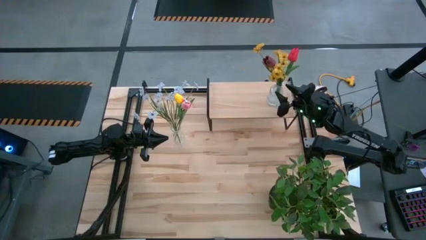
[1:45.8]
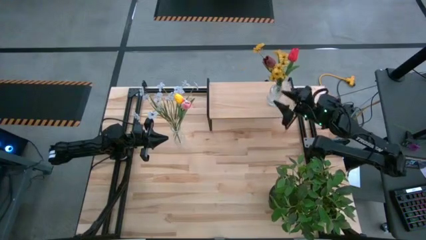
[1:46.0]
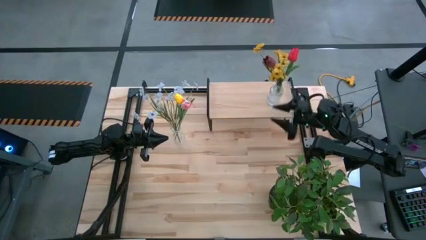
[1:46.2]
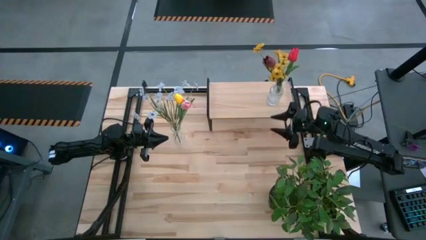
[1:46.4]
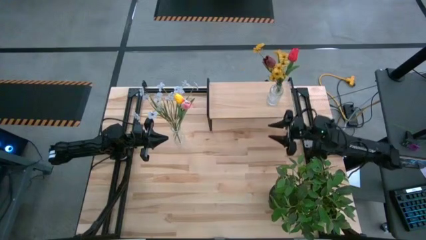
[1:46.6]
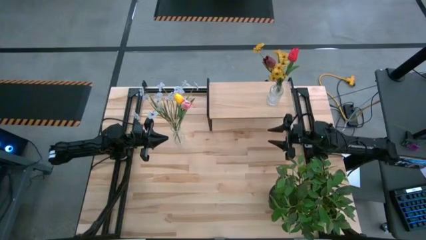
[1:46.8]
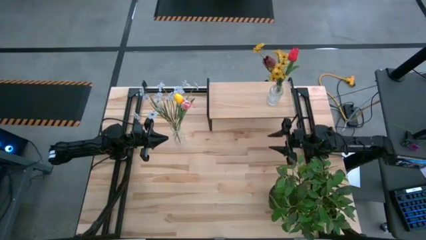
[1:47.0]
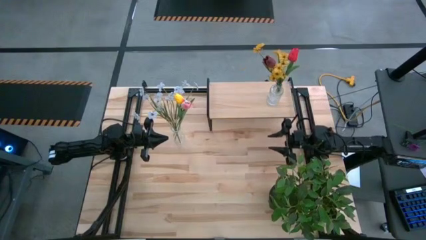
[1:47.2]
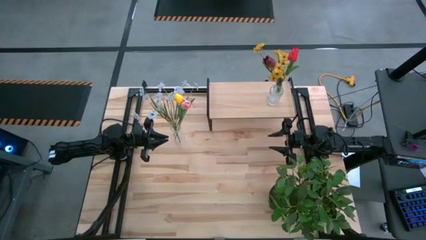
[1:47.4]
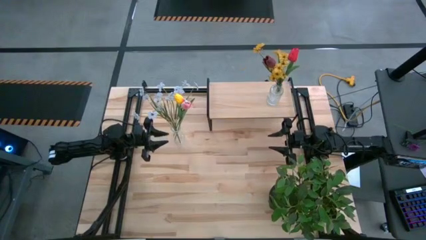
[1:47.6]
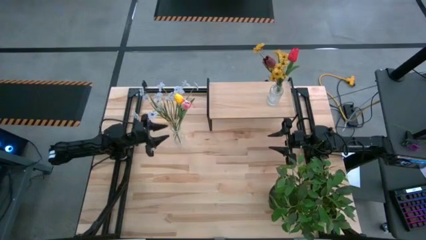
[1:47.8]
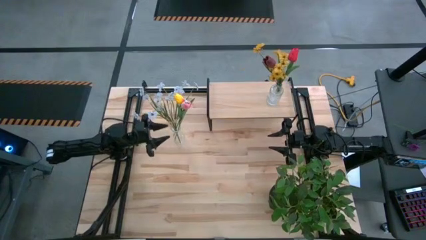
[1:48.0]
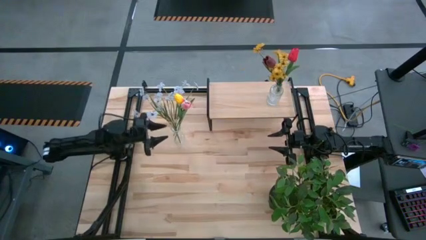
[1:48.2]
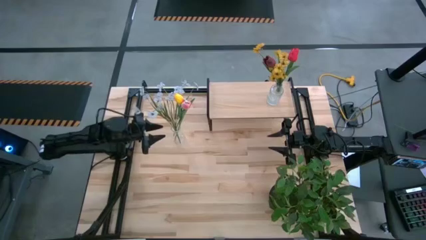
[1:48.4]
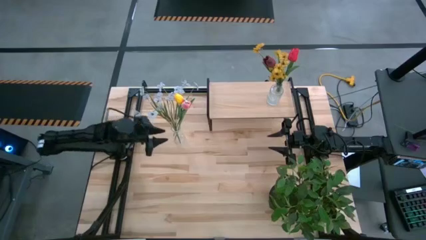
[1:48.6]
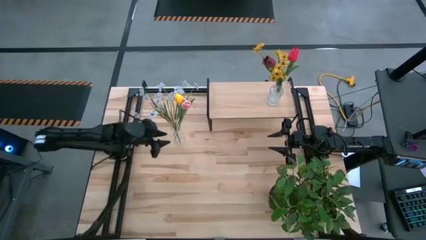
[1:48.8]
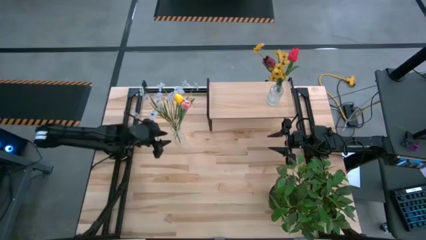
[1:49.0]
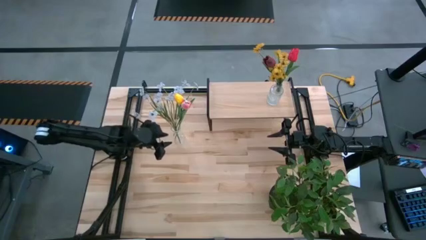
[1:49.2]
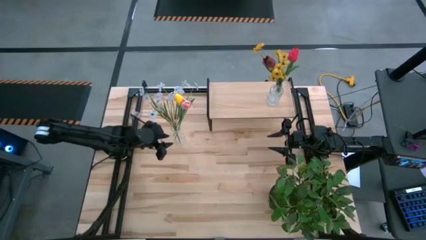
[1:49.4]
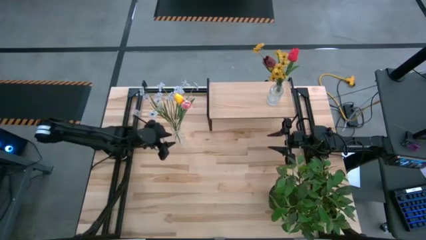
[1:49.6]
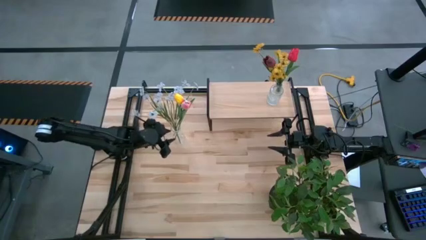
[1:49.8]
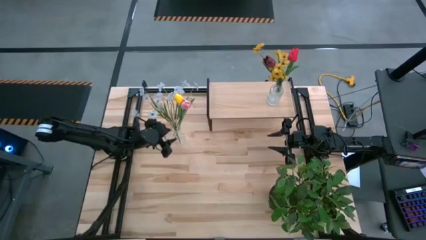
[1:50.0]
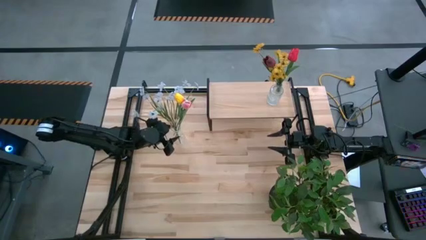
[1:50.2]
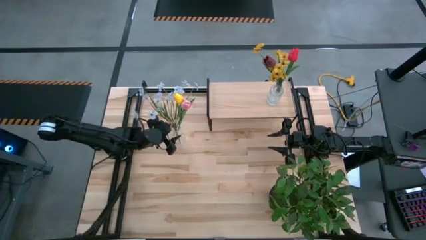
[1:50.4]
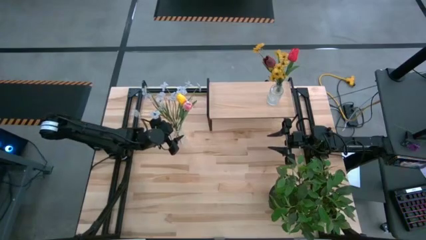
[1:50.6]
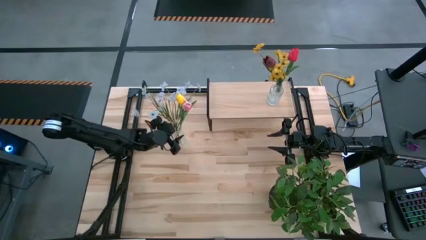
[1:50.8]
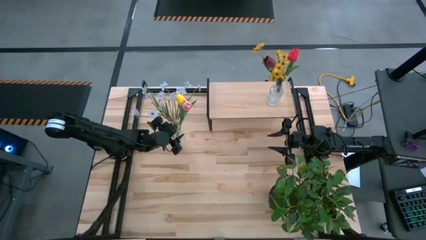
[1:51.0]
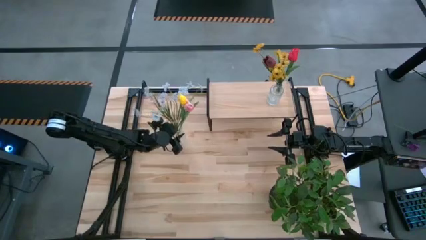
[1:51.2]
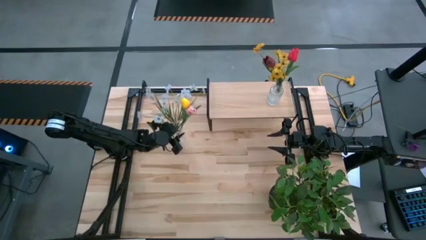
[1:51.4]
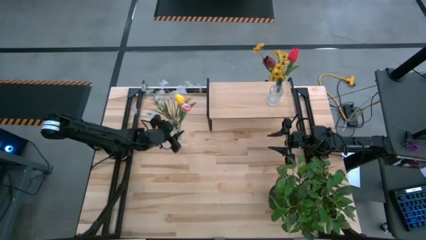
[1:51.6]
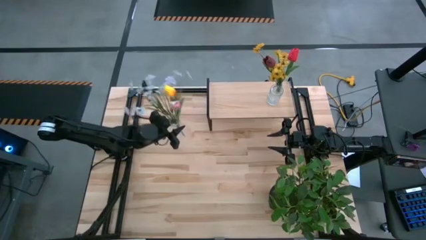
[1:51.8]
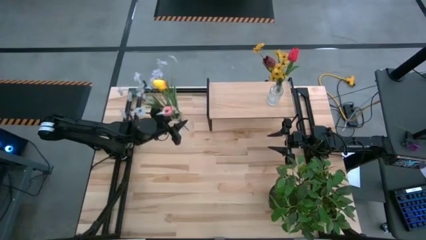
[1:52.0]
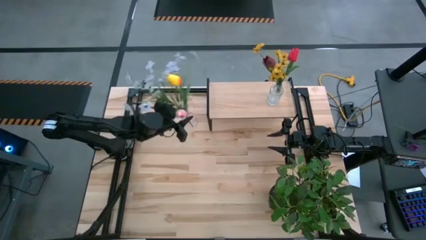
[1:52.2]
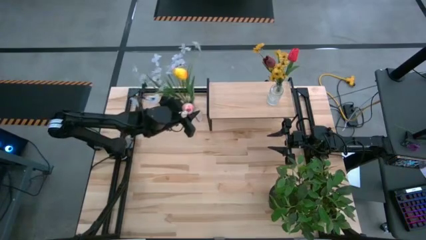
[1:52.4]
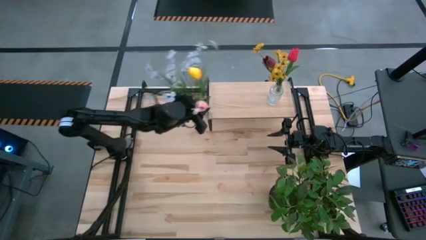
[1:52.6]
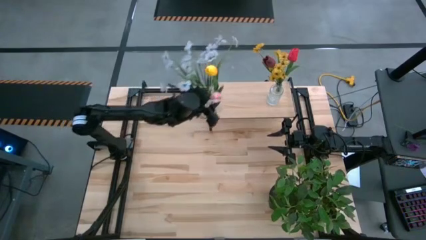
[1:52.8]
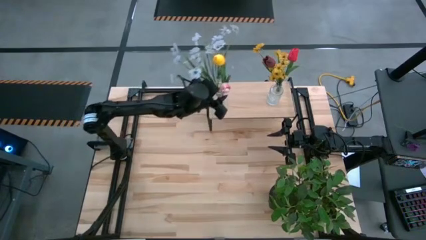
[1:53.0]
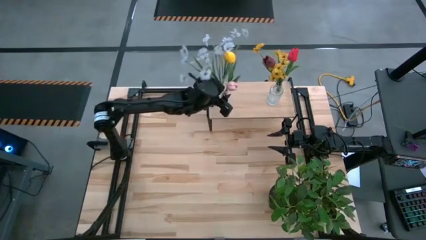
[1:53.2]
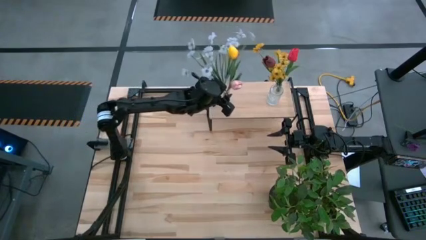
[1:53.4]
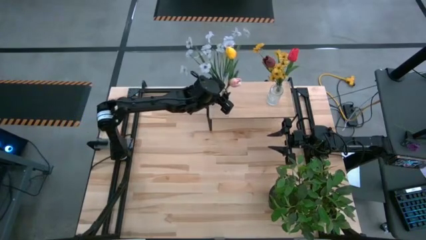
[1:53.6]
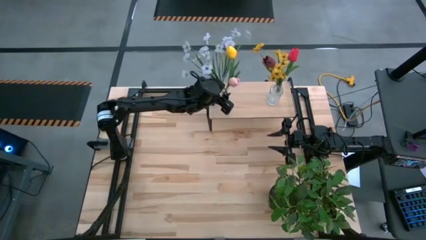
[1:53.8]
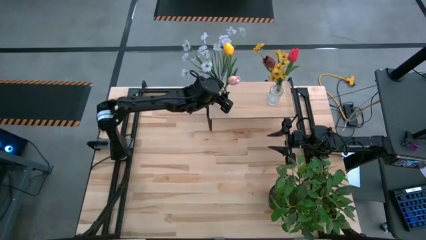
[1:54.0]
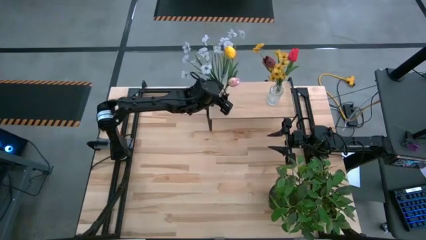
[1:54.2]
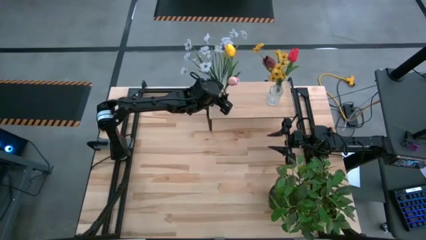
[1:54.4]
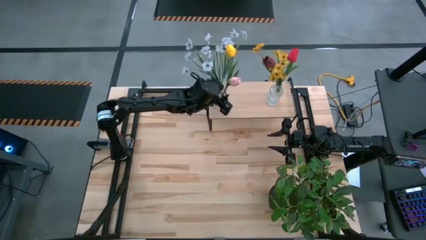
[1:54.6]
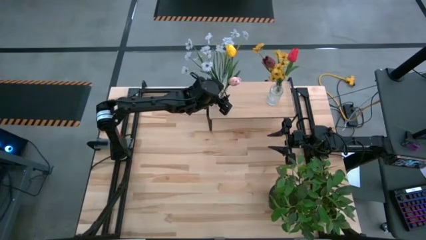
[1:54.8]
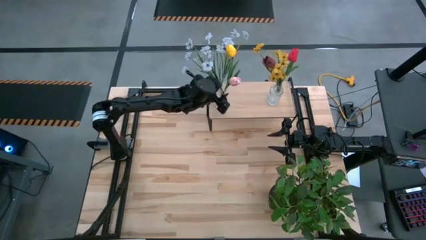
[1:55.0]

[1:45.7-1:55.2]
Task: Pick and place flowers into a vace then onto a shelf
Put the transparent vase with the flowers on the shelf

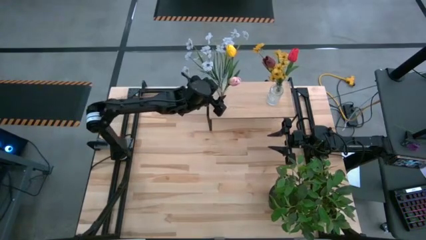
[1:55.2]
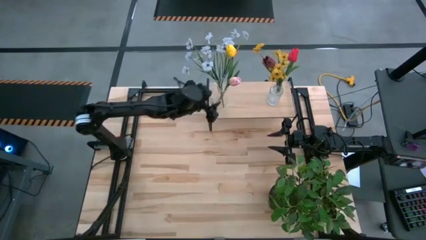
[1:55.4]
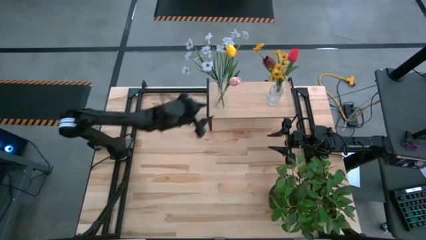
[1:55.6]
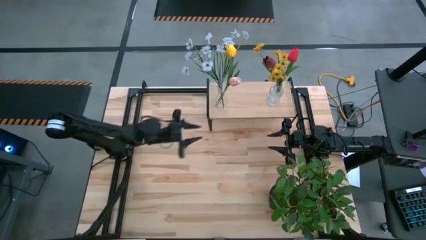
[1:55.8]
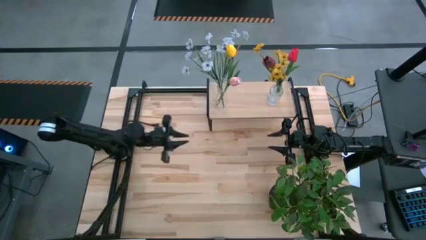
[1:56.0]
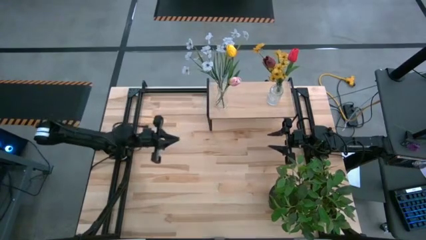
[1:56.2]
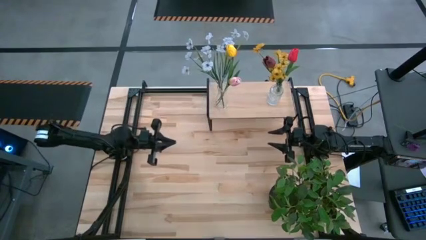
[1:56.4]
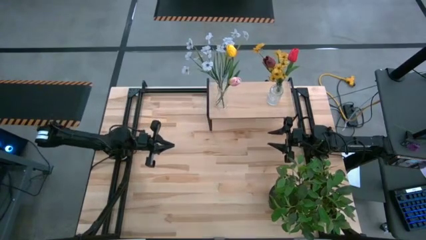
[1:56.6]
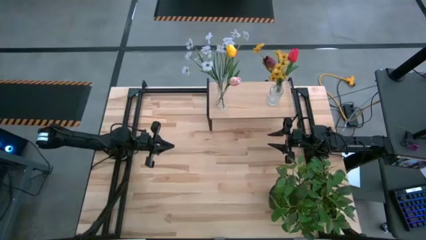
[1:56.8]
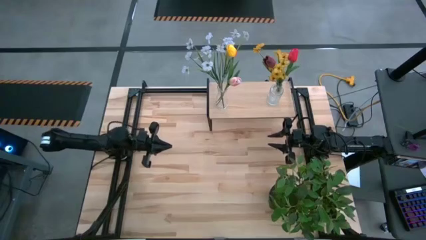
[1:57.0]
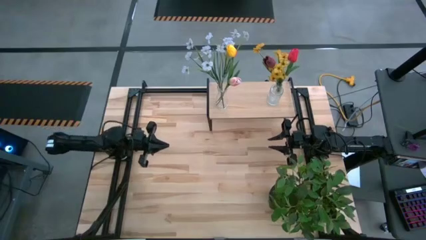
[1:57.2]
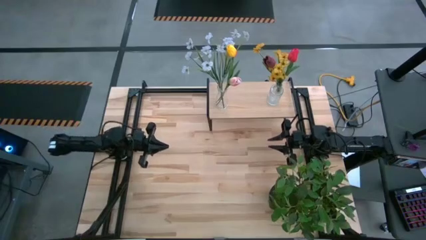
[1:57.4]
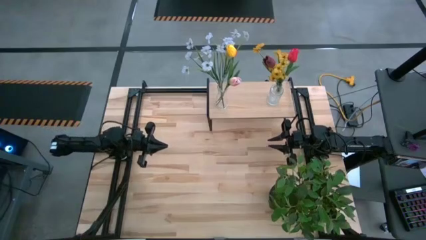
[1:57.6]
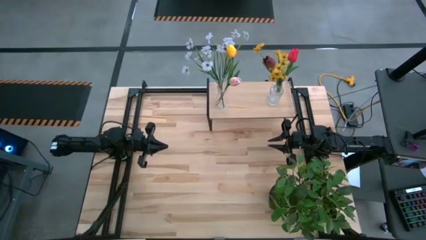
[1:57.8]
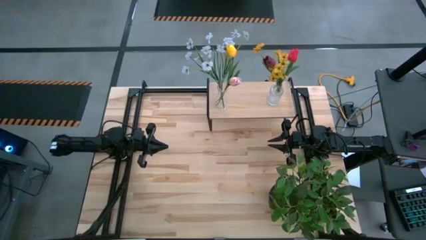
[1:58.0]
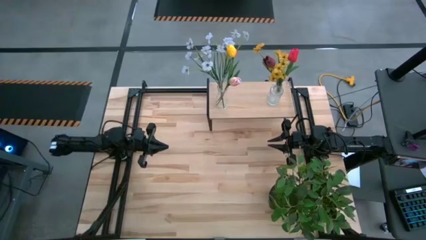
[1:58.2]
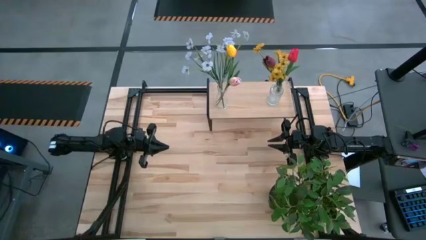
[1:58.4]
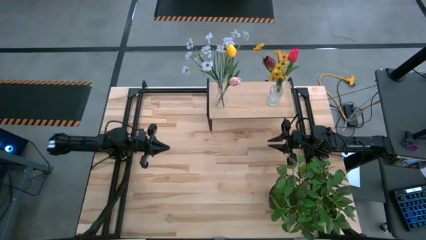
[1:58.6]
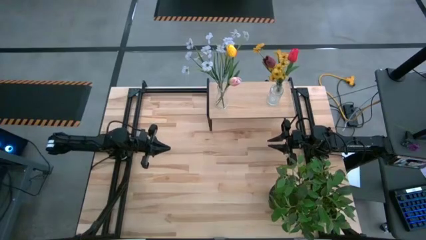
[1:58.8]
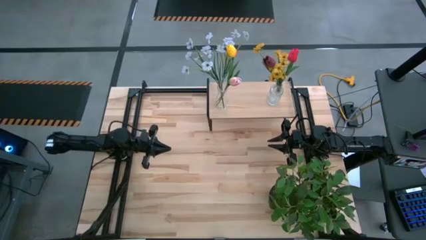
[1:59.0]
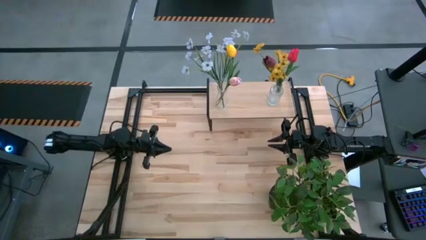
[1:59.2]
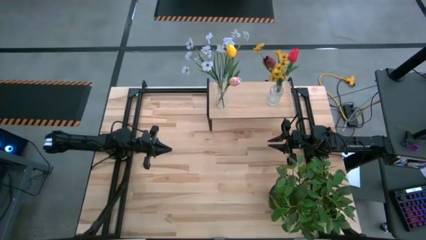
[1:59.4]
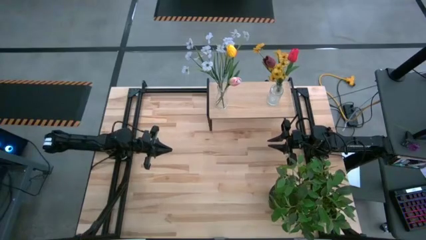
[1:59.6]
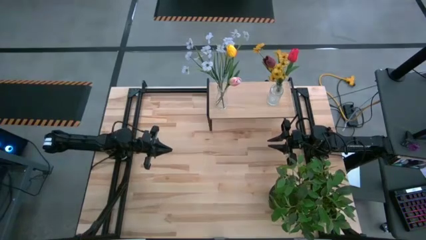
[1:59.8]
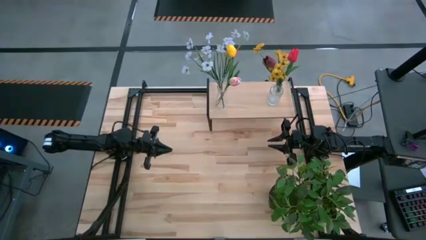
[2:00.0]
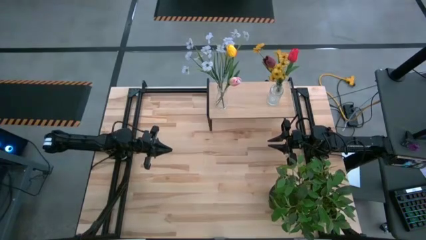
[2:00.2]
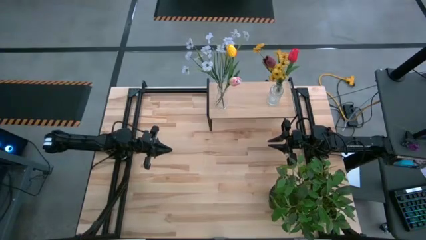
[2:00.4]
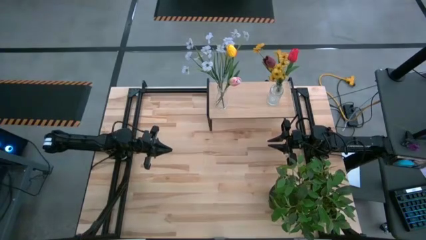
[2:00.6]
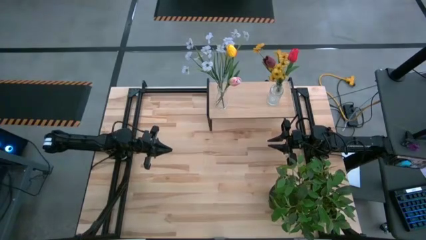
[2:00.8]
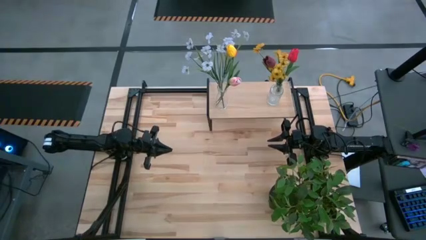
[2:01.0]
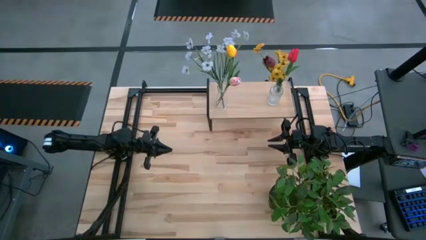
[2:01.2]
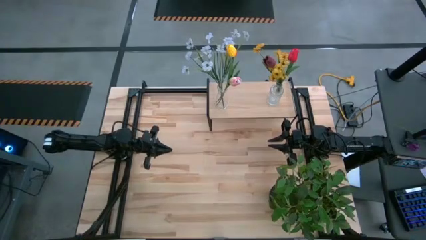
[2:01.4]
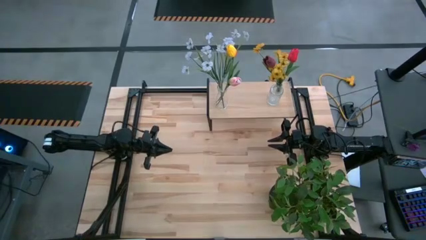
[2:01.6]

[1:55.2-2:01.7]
Return to Home Position
